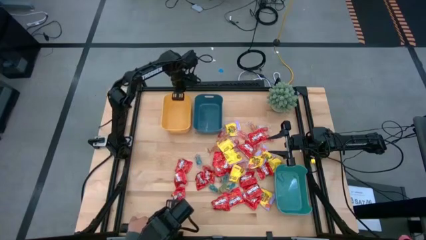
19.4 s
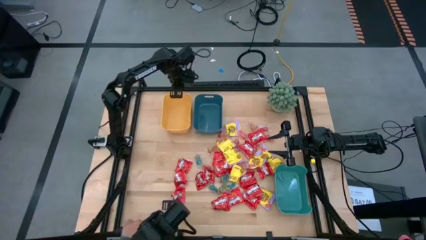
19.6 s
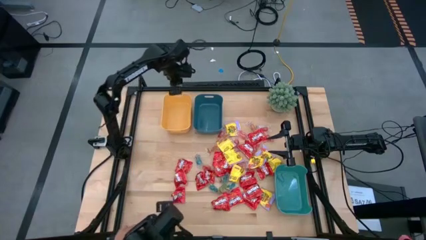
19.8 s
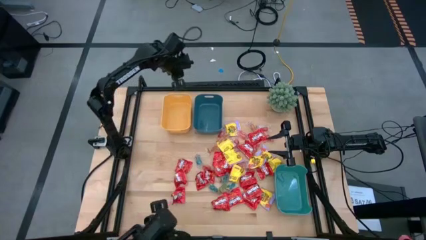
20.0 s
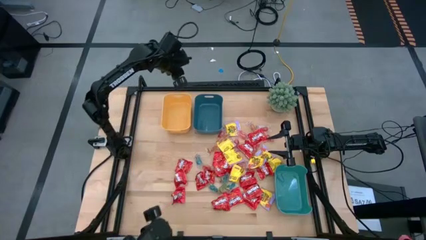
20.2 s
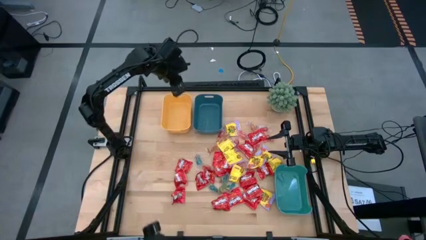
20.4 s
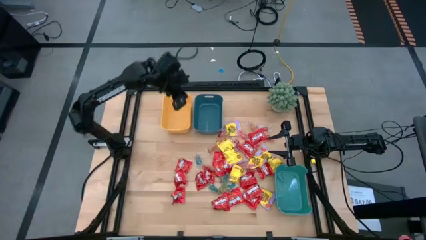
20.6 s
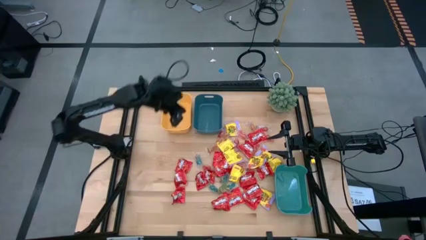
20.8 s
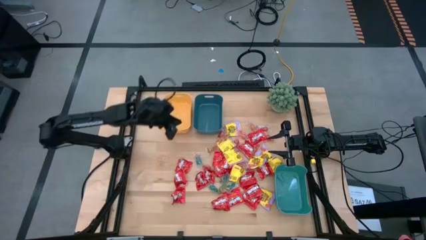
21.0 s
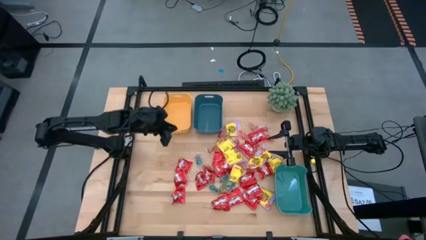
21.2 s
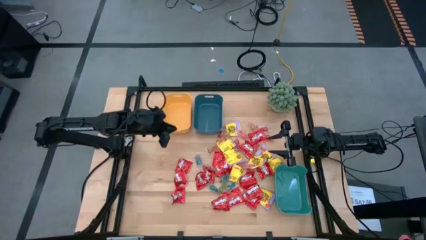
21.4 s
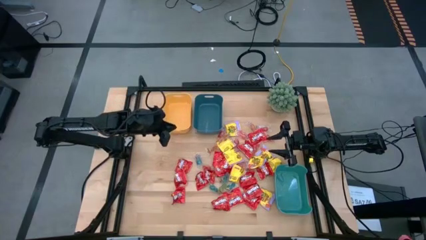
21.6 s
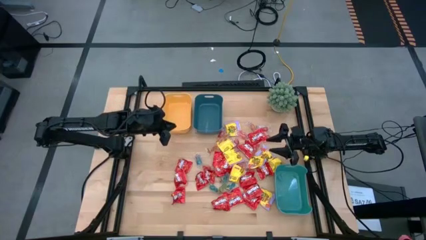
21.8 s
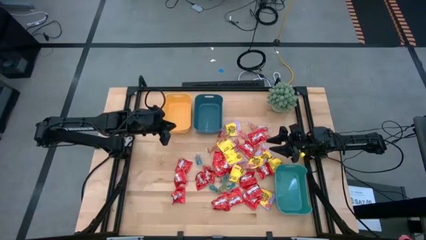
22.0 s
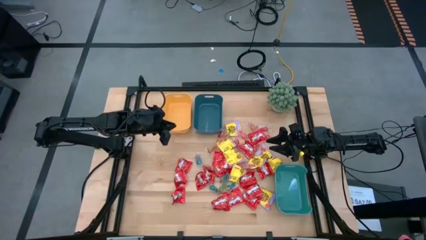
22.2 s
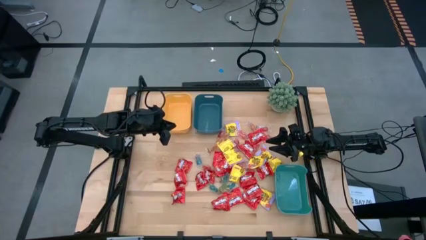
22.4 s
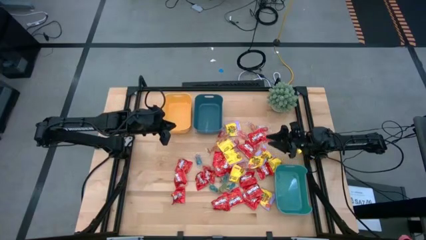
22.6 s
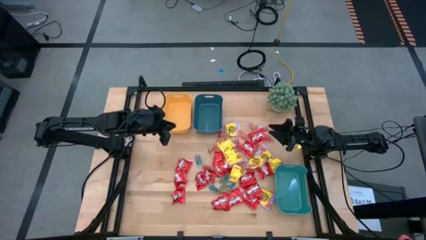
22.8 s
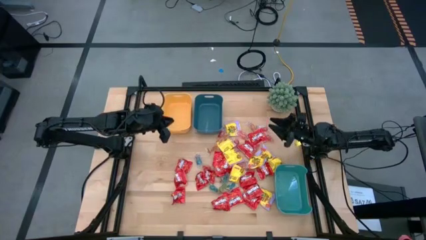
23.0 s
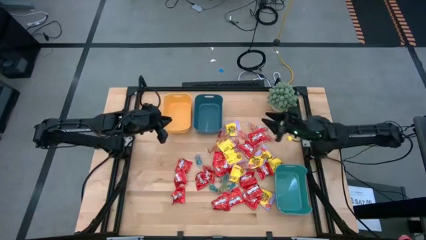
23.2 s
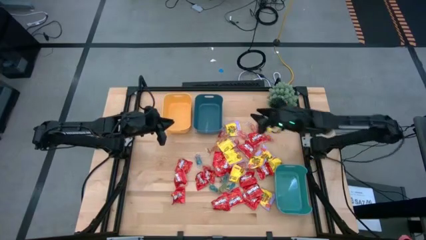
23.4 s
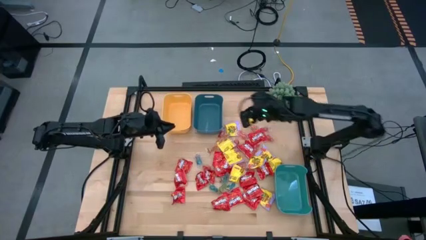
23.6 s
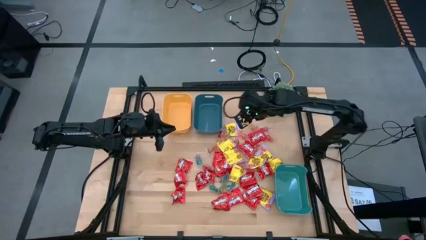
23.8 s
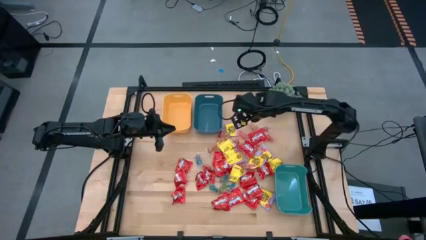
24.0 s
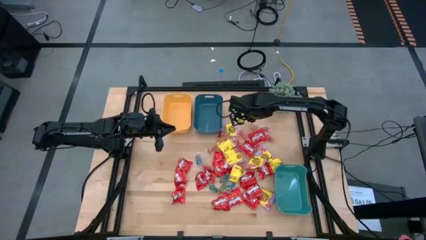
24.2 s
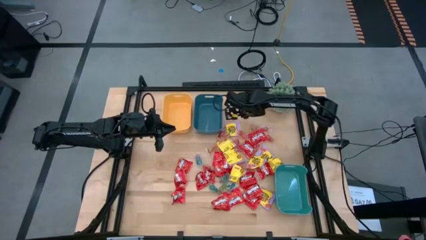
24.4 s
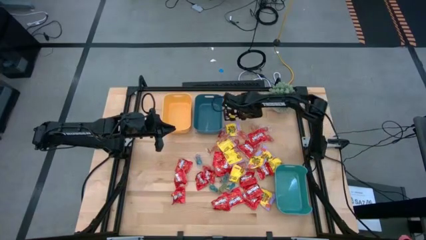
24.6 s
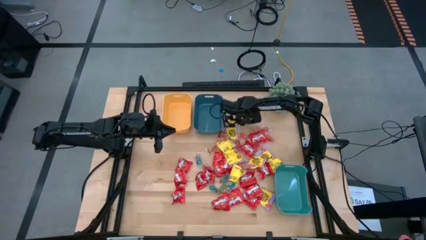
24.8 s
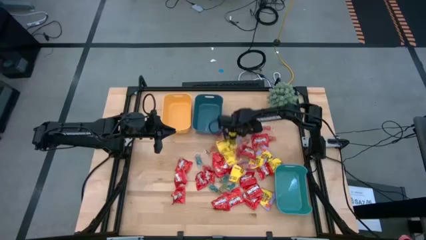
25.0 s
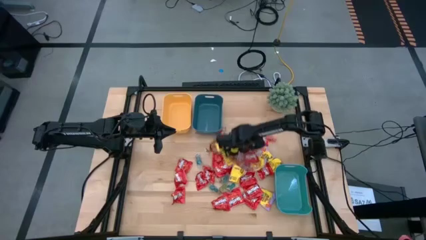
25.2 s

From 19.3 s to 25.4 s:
Task: Sort candy
Move the candies on the table

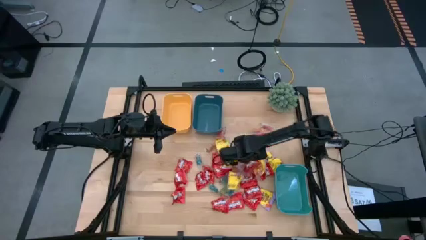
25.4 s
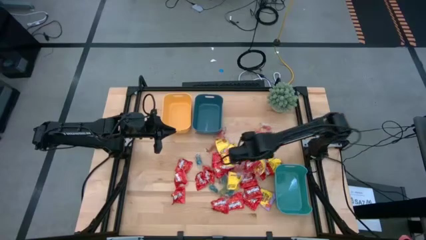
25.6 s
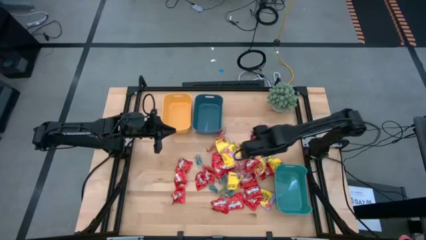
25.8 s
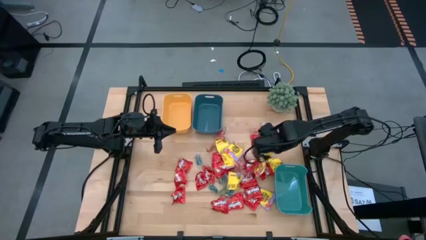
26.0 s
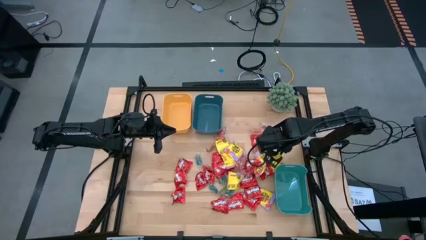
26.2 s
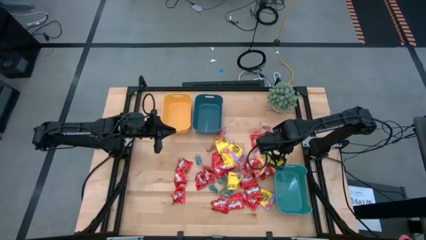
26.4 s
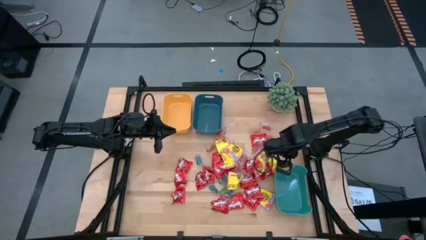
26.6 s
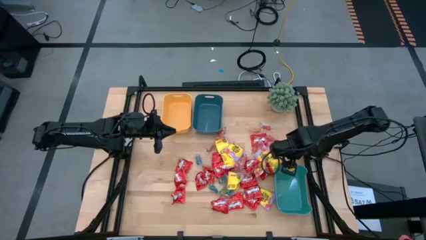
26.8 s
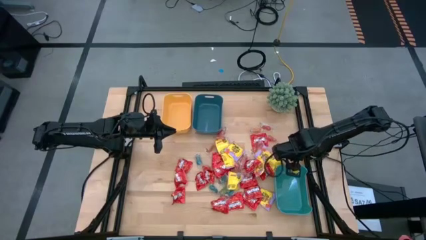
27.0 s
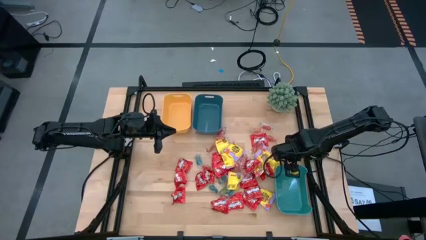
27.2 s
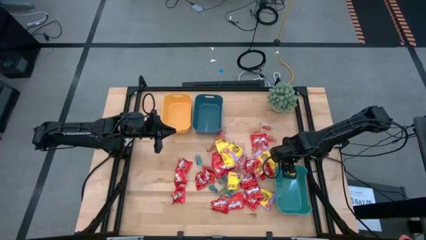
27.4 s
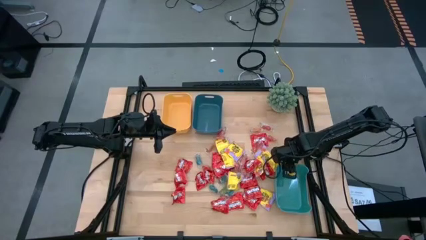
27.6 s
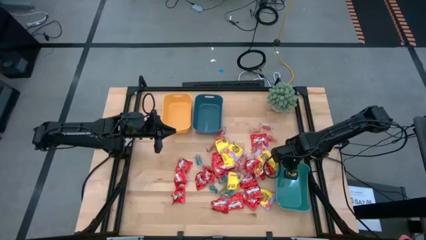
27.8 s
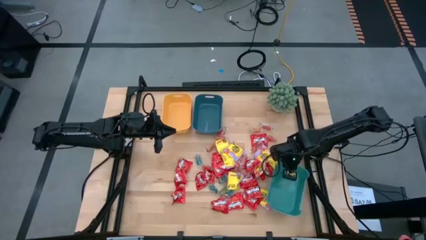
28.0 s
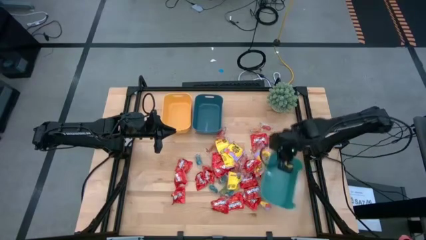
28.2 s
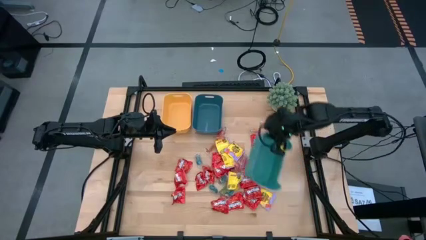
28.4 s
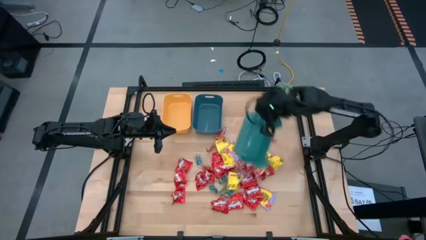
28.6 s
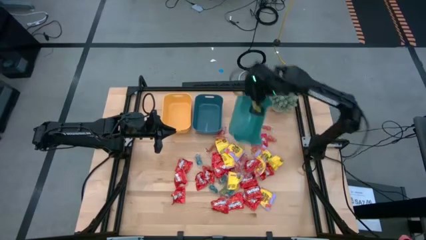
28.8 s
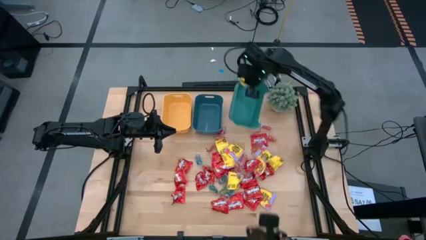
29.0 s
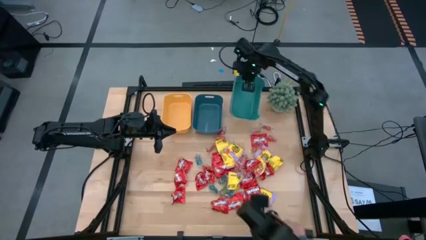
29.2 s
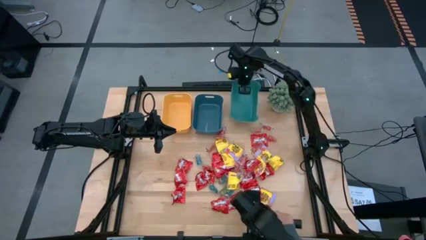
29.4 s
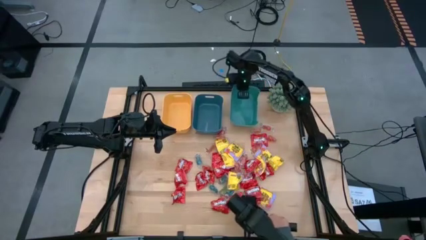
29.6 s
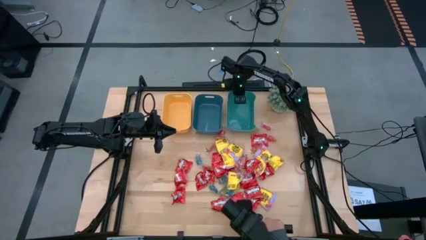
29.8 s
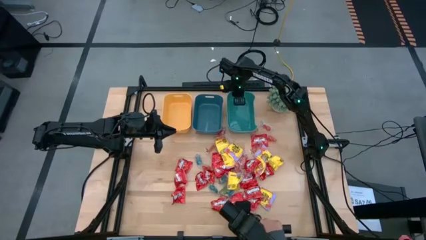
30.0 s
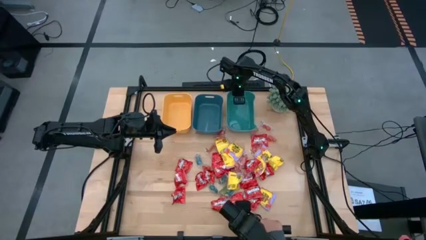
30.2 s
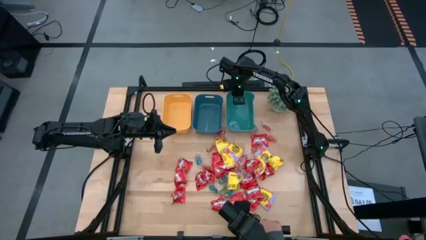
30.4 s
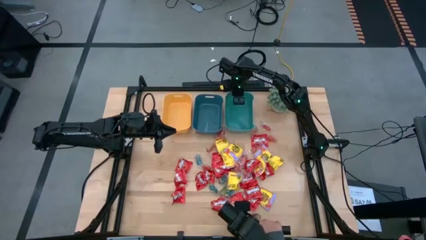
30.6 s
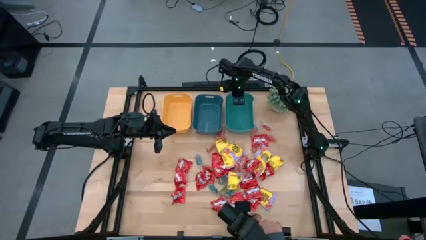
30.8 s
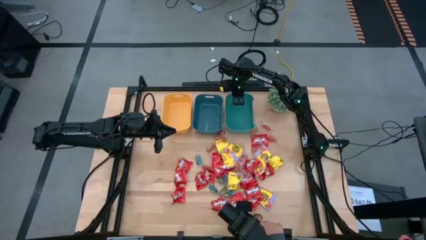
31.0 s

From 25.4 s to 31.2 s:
Move the green bin to the top right of the table

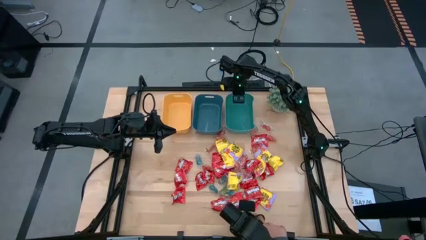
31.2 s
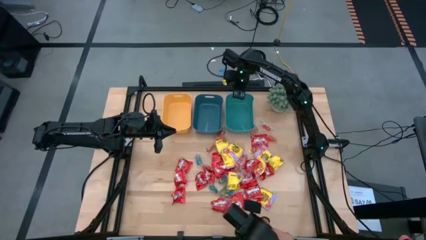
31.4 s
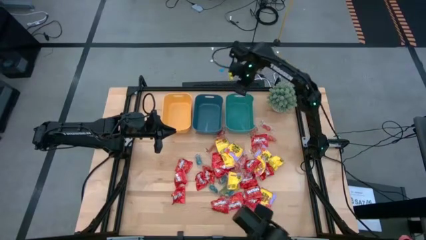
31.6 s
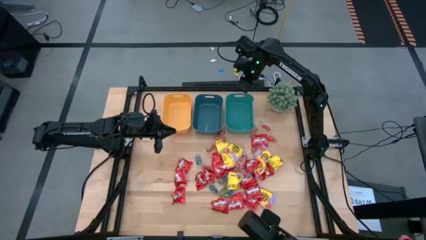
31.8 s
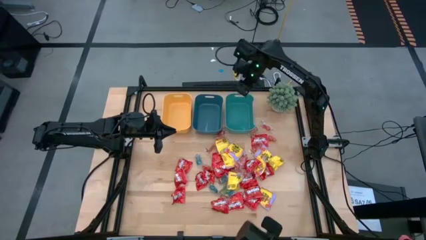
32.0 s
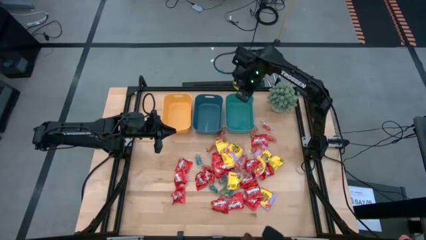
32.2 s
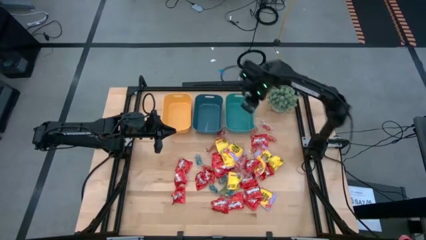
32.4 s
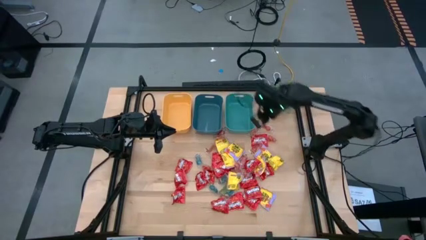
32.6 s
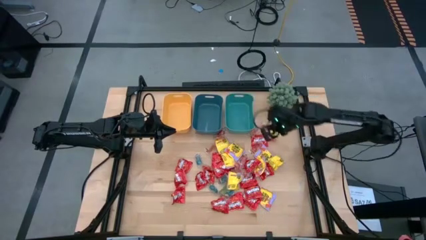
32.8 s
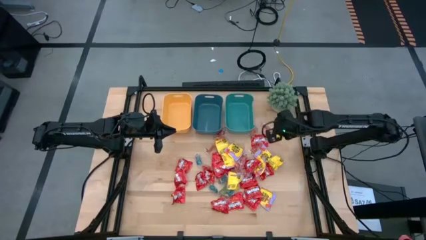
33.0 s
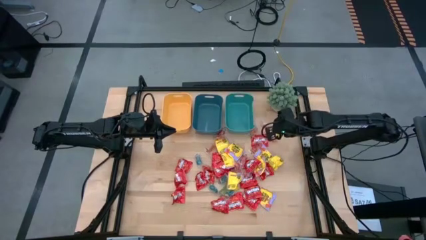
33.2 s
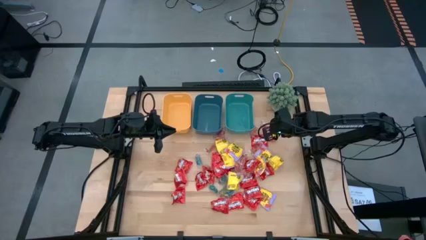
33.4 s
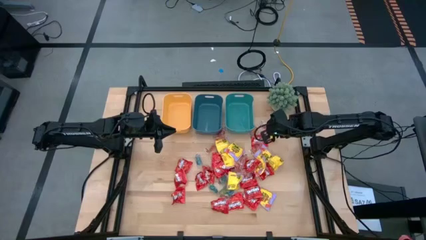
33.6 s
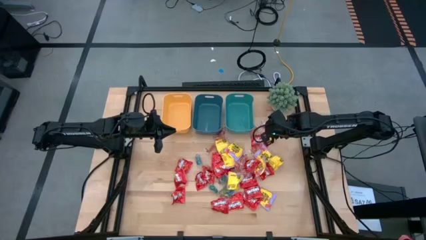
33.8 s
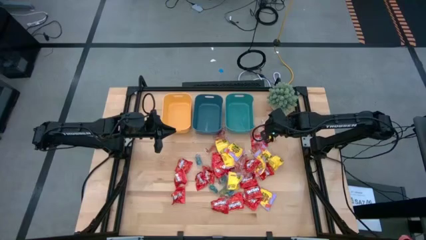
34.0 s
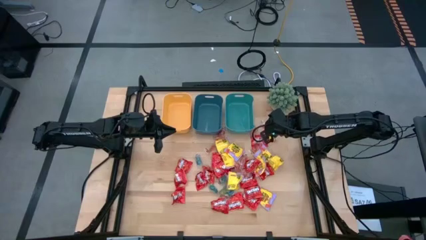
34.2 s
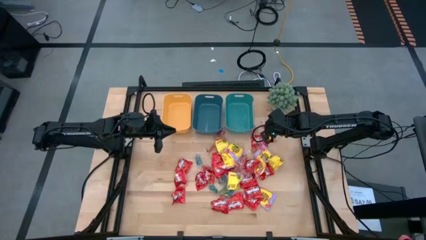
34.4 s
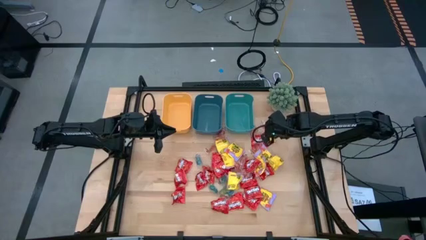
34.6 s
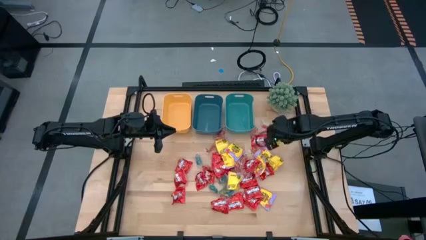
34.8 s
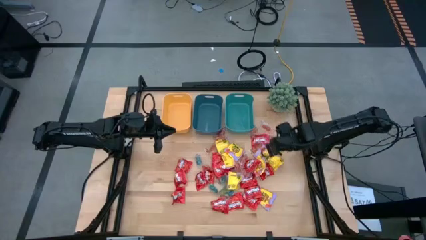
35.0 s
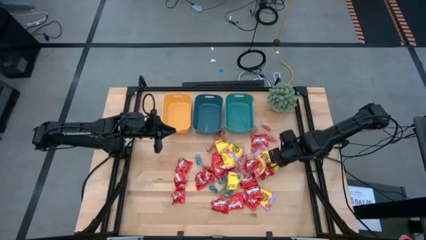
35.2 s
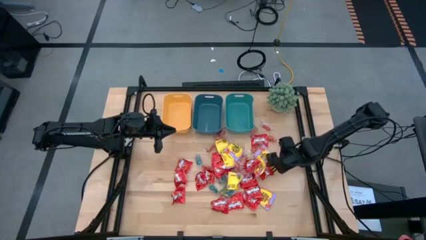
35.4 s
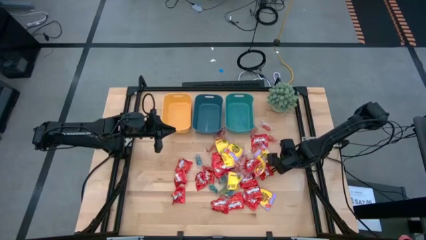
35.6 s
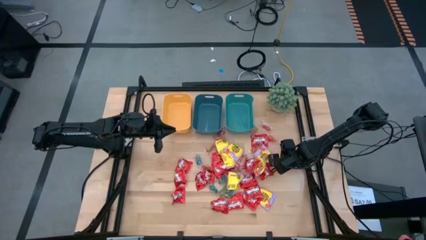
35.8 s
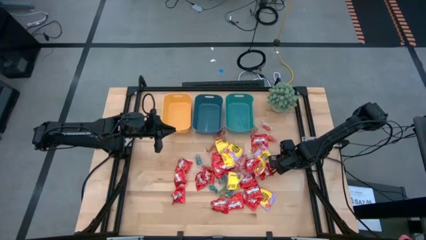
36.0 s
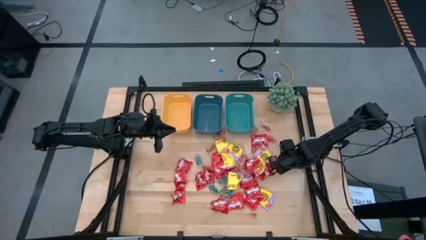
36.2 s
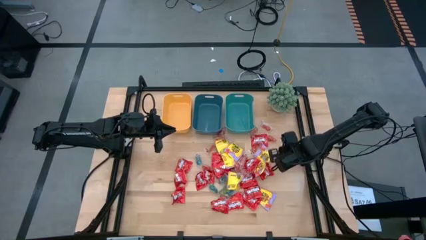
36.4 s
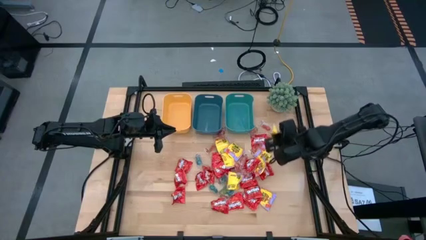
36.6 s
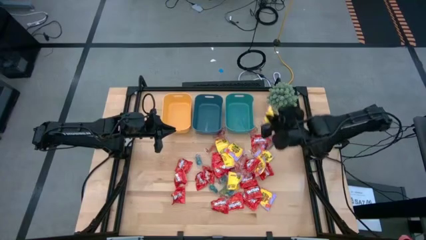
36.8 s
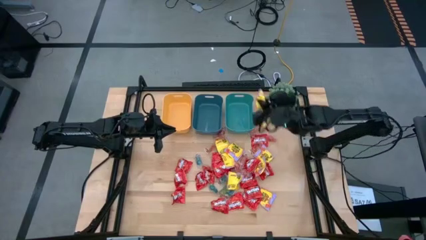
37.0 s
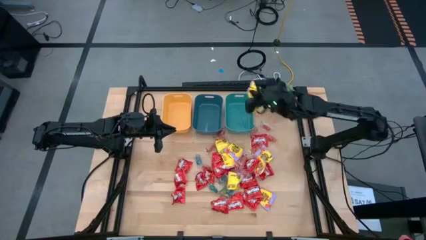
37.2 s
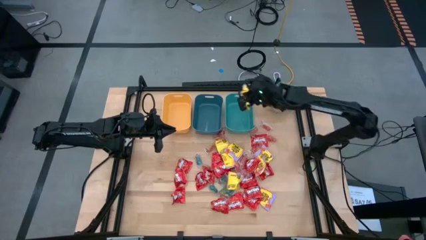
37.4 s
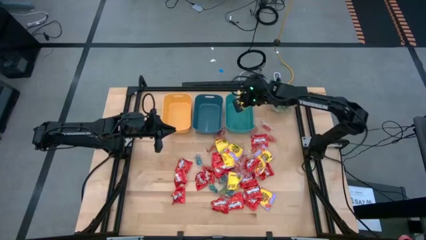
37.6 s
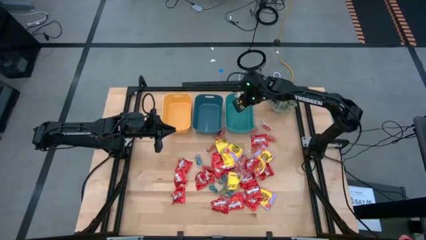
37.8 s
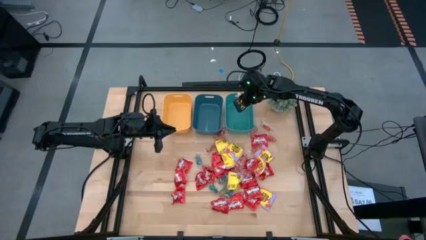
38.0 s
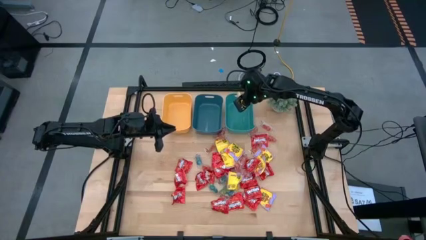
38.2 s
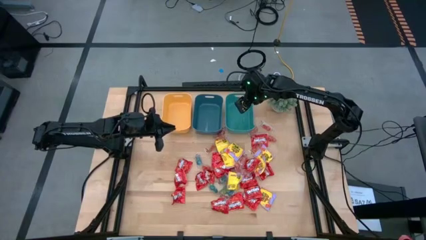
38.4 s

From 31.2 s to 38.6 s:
Put the yellow candy into the green bin
